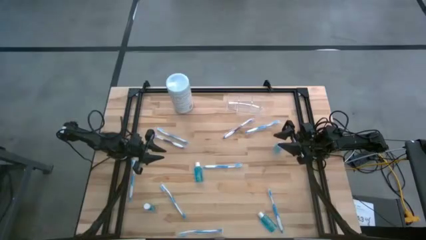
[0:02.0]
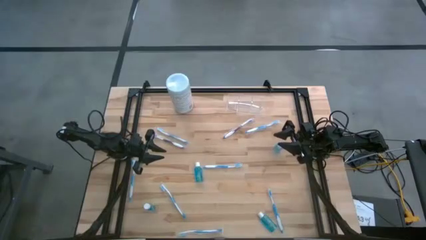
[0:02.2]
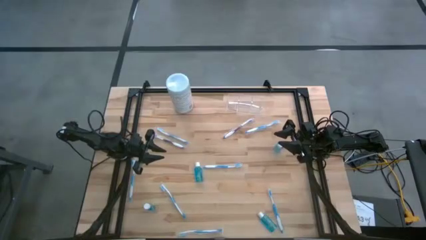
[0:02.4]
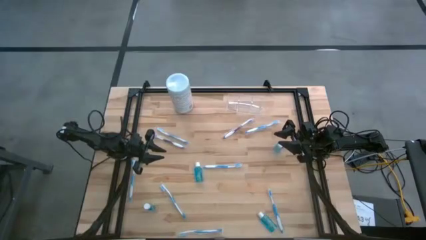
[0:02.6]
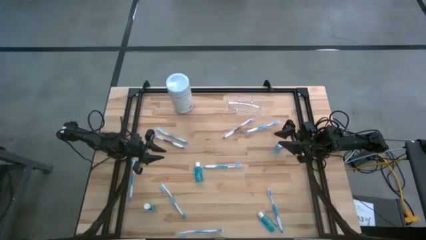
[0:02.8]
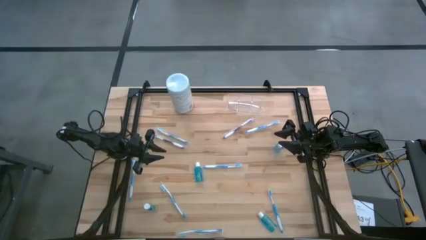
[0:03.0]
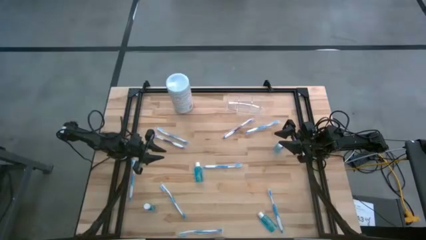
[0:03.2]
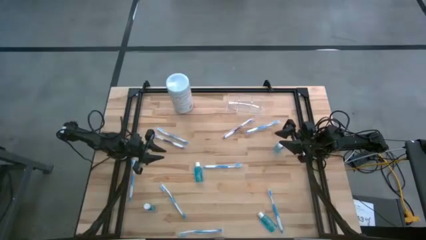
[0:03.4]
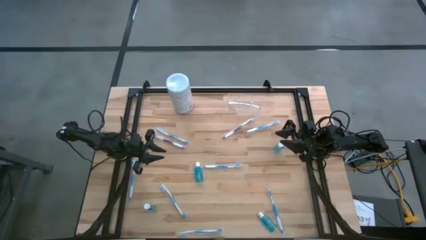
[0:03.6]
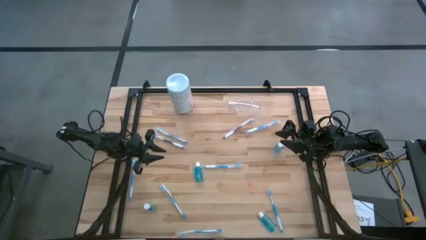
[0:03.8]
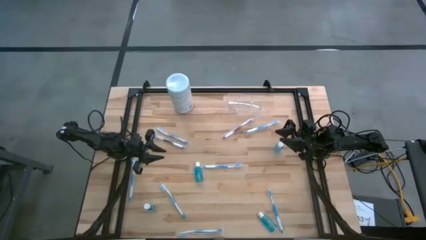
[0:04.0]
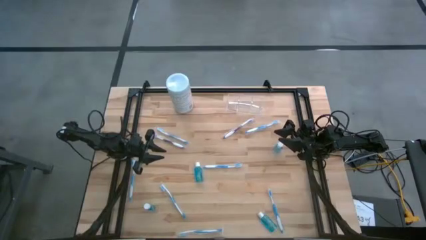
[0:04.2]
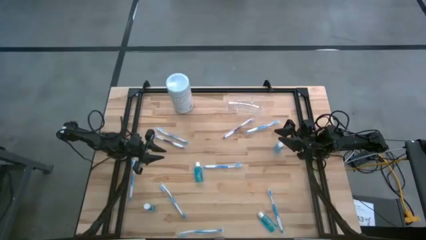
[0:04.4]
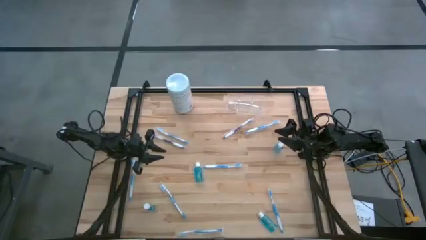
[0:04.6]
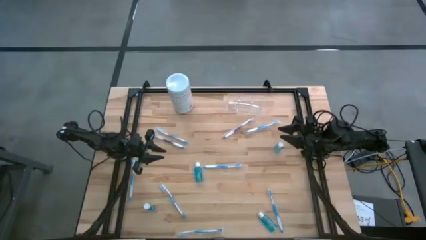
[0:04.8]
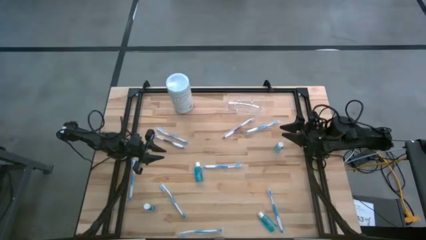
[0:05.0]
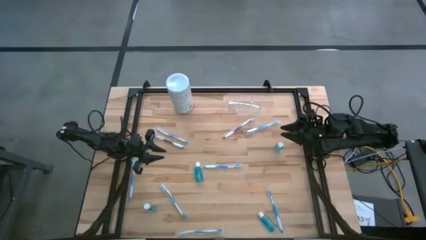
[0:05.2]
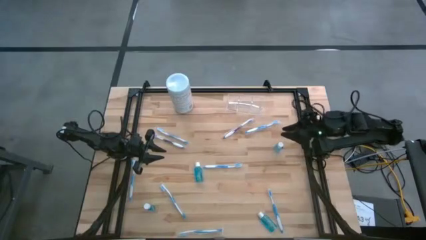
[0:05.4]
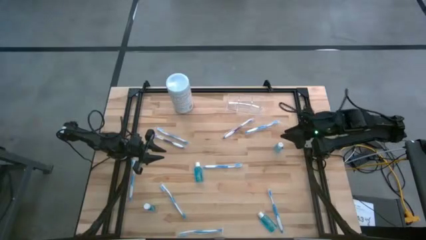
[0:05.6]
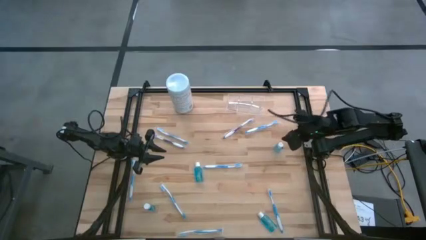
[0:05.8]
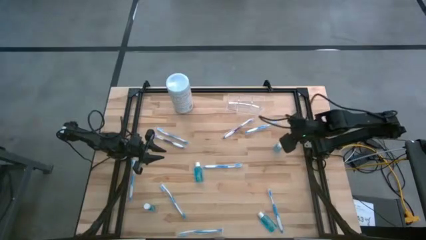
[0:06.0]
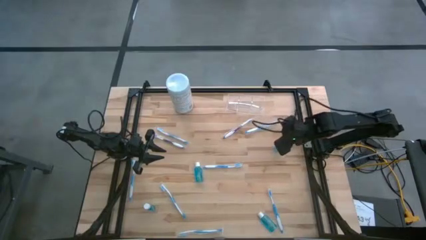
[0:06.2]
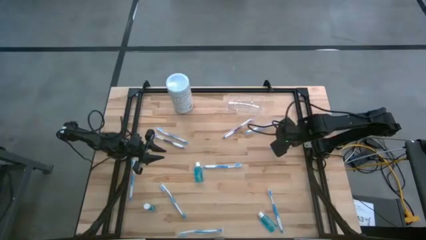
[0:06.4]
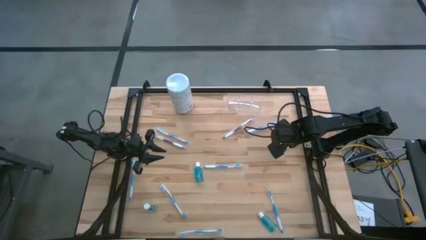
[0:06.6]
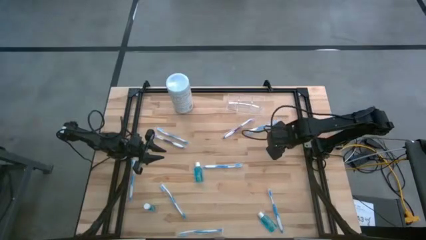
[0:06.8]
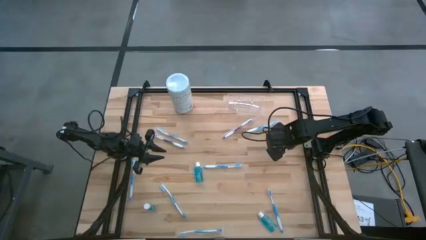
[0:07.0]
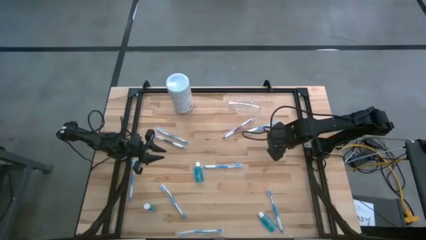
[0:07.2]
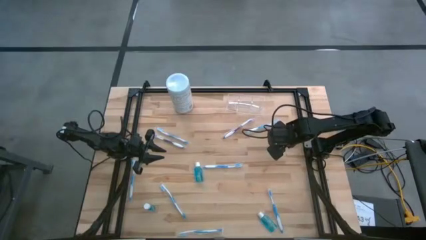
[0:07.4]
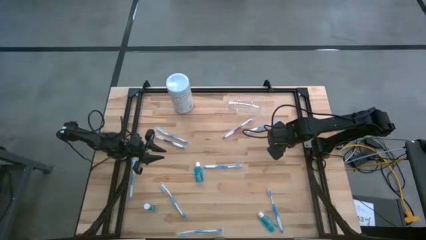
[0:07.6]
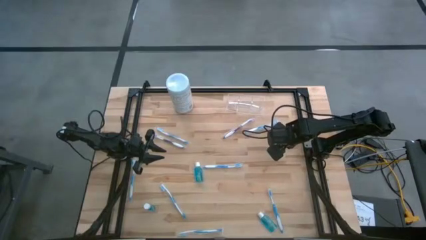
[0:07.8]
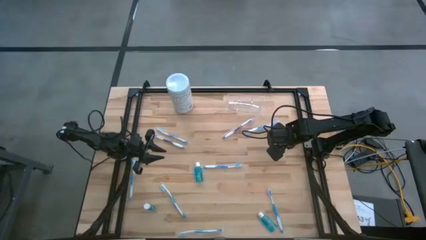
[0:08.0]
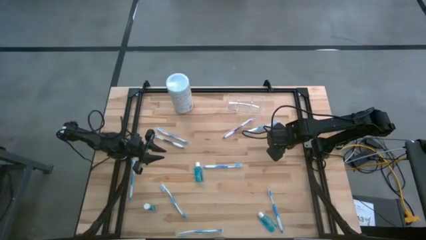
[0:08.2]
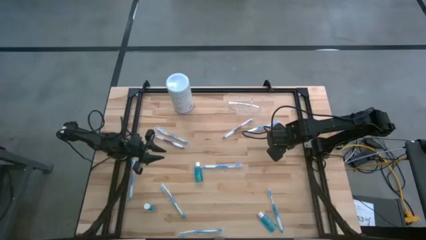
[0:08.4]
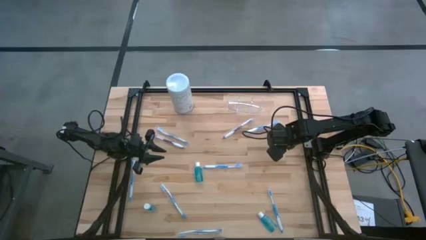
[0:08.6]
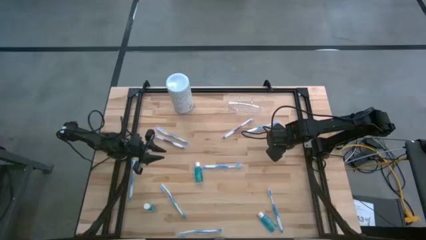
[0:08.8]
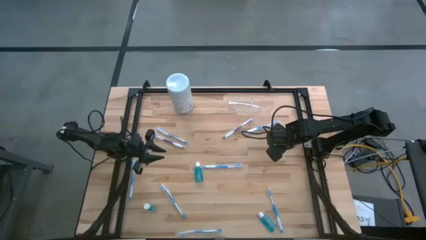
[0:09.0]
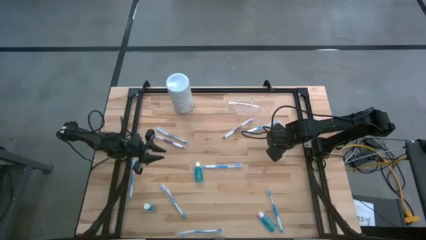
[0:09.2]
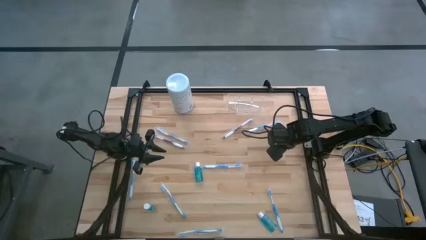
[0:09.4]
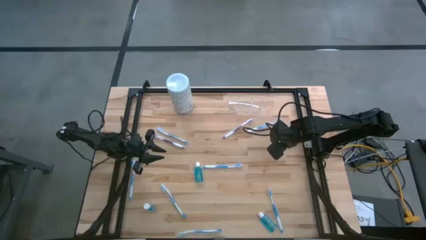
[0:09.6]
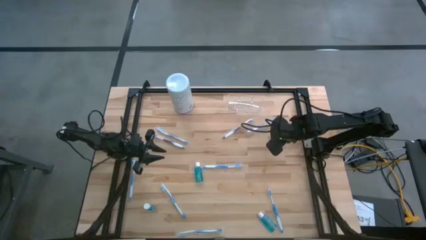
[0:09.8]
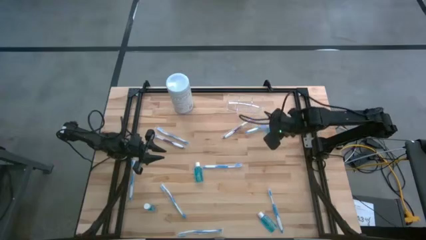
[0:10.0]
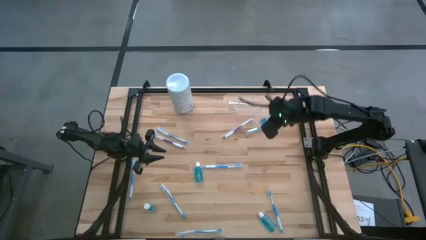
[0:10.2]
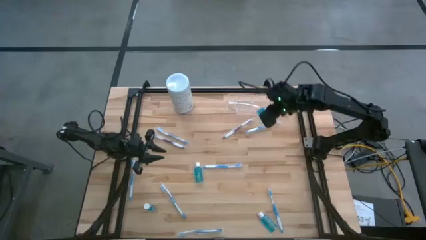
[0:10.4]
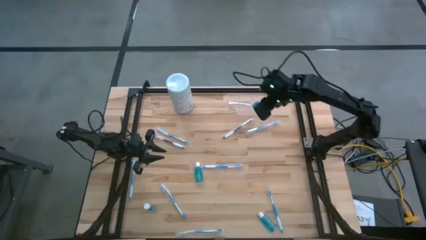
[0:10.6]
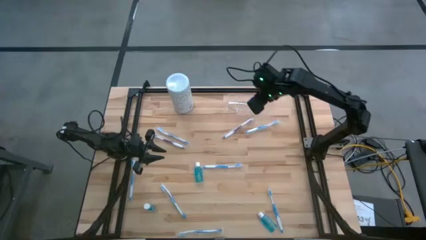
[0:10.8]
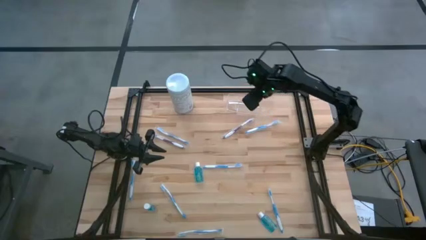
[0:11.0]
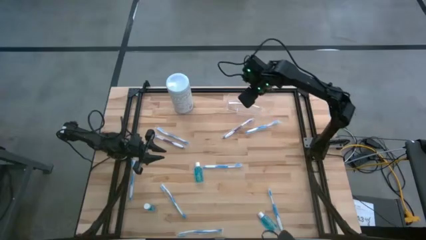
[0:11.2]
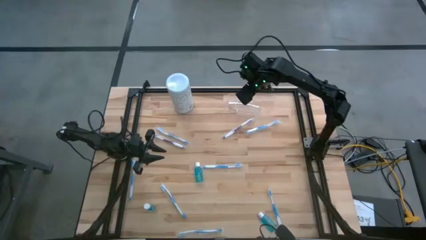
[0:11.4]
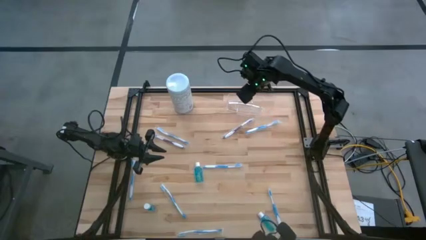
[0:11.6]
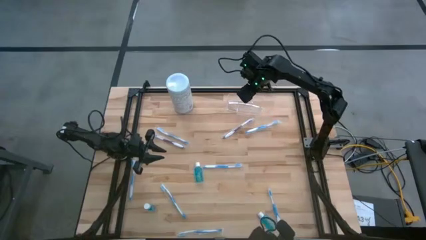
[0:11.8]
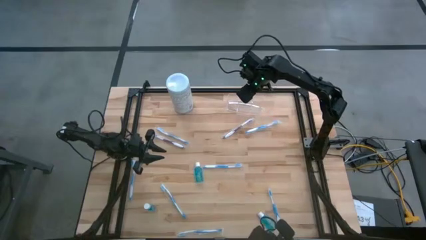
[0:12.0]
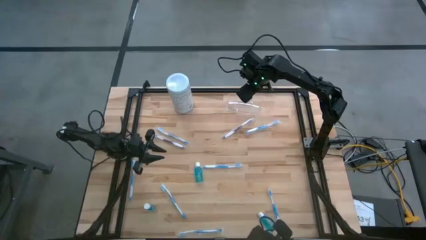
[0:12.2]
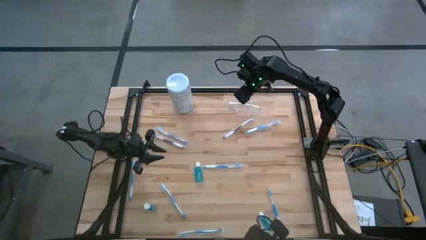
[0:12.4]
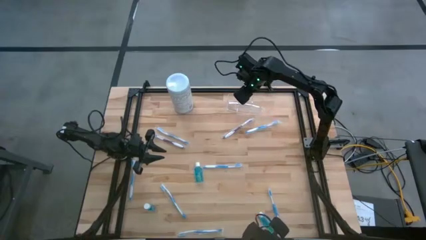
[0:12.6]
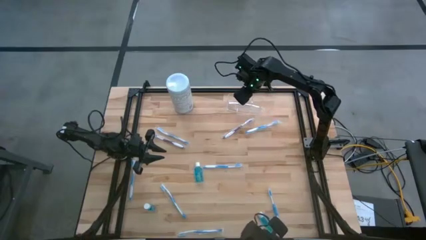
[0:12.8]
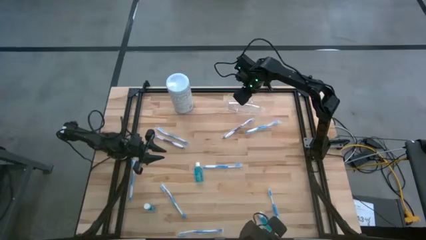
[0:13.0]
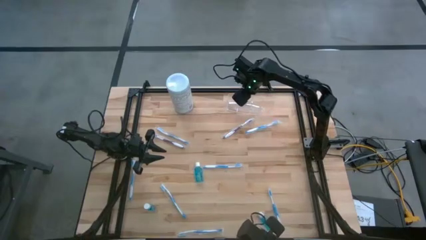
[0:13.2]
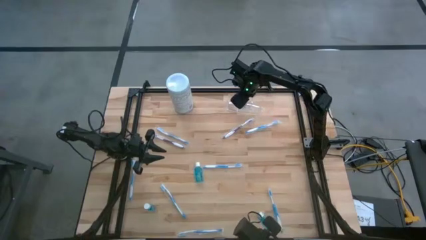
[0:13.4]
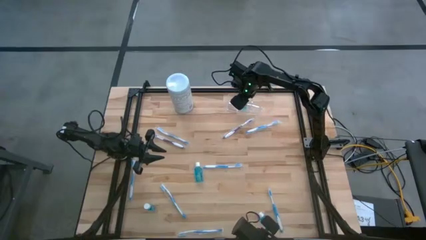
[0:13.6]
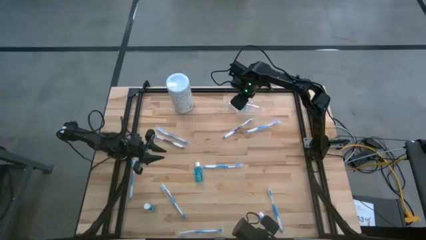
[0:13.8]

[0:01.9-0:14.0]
Task: Pick & Place toothbrushing station
Put the blue mouthwash into the middle of the transparent organizer

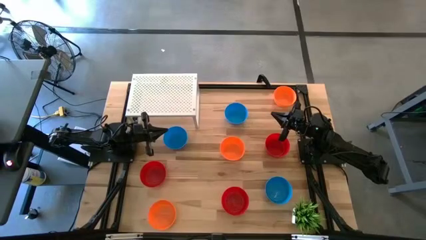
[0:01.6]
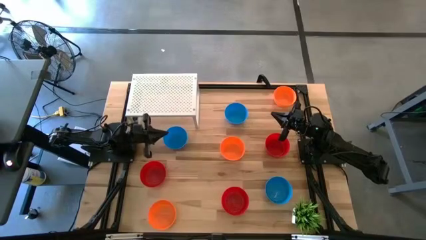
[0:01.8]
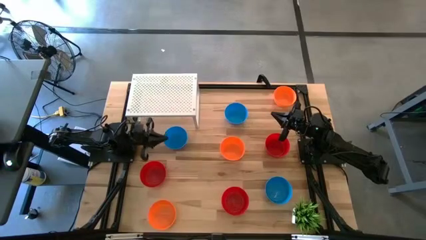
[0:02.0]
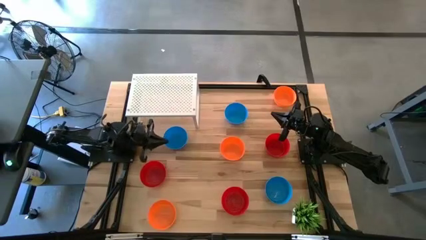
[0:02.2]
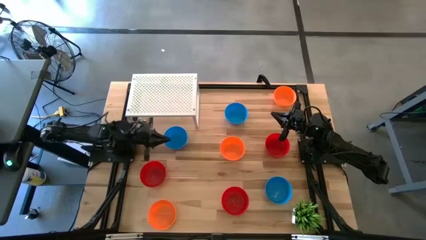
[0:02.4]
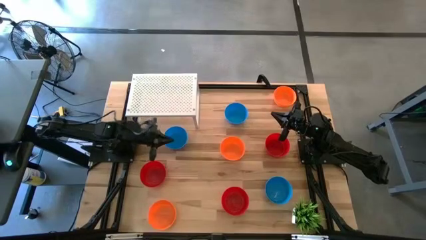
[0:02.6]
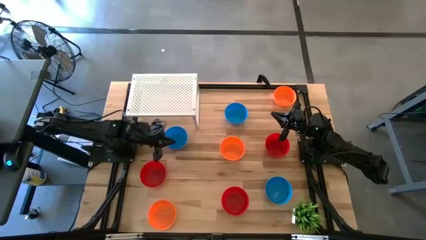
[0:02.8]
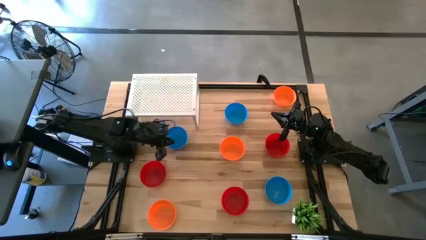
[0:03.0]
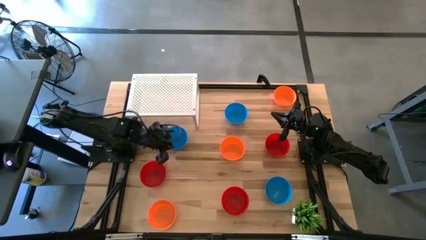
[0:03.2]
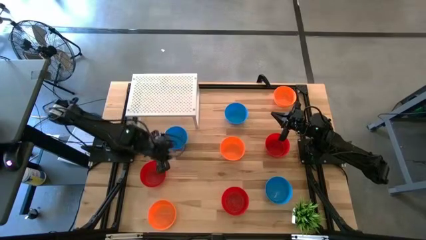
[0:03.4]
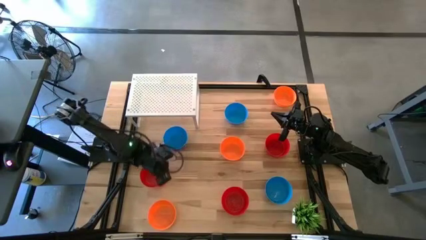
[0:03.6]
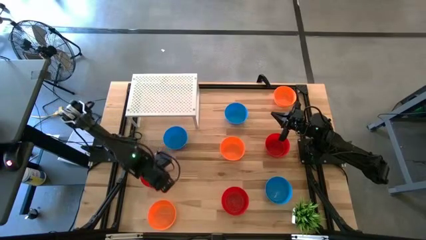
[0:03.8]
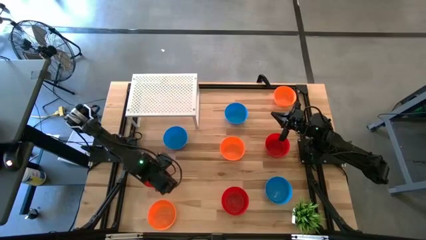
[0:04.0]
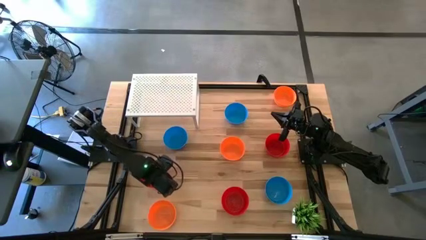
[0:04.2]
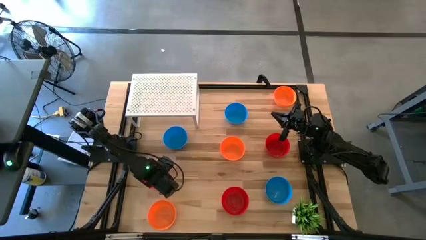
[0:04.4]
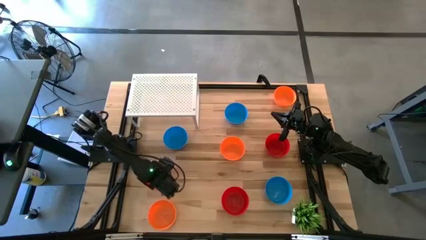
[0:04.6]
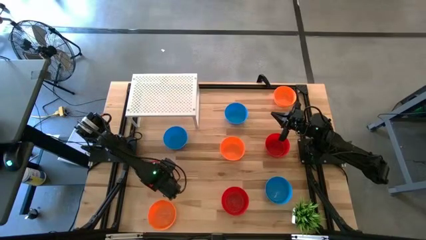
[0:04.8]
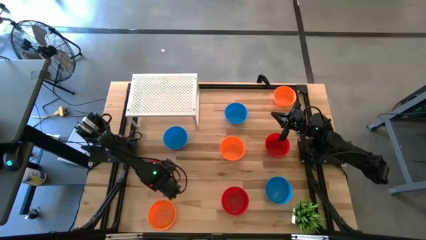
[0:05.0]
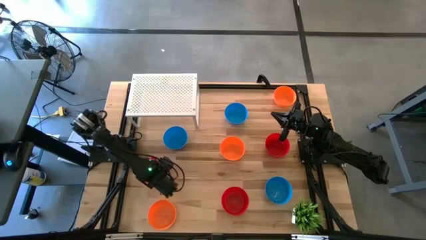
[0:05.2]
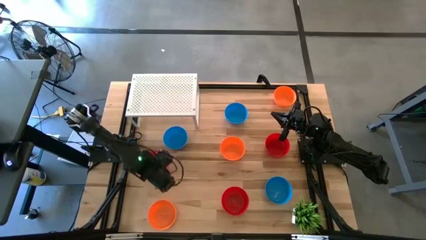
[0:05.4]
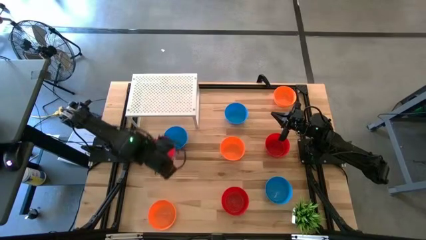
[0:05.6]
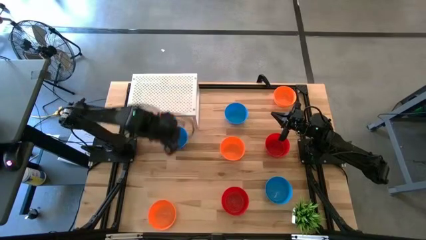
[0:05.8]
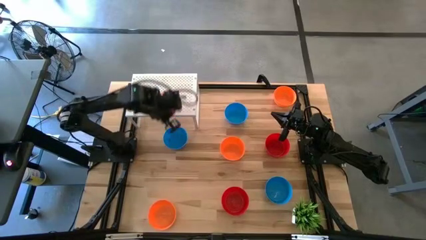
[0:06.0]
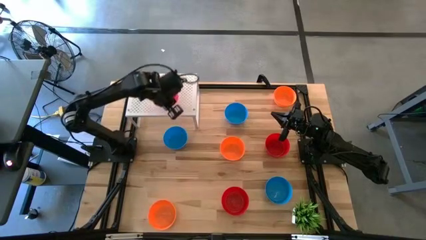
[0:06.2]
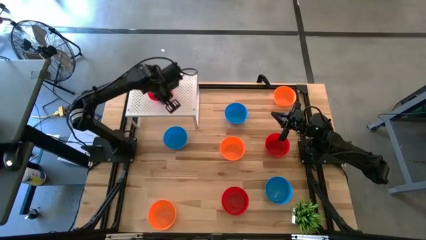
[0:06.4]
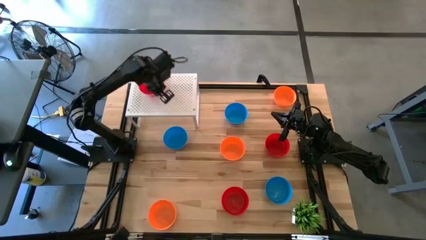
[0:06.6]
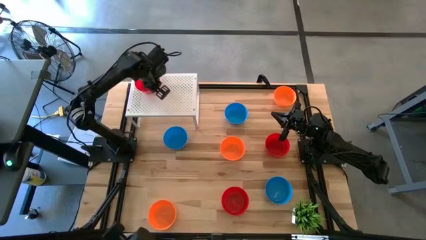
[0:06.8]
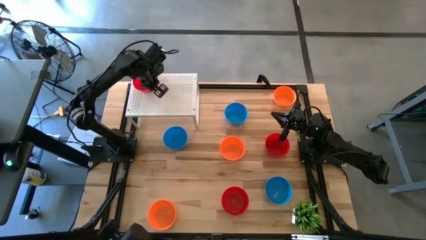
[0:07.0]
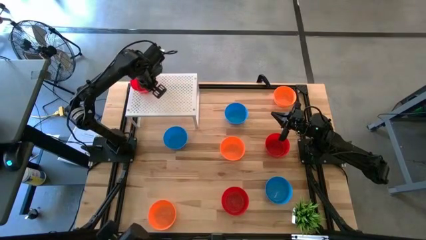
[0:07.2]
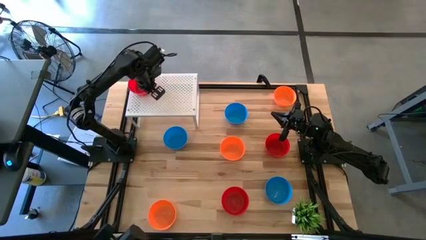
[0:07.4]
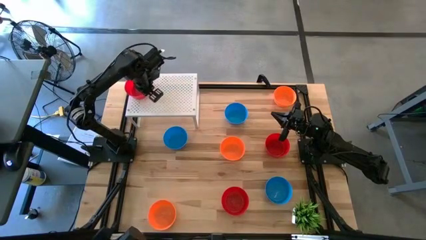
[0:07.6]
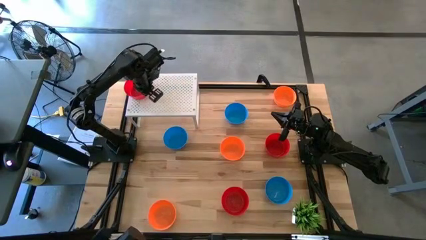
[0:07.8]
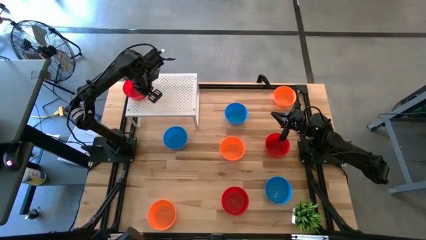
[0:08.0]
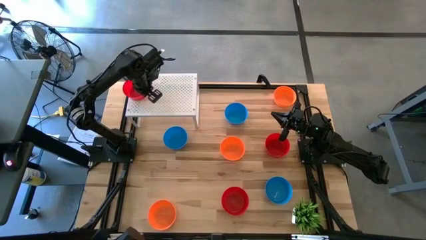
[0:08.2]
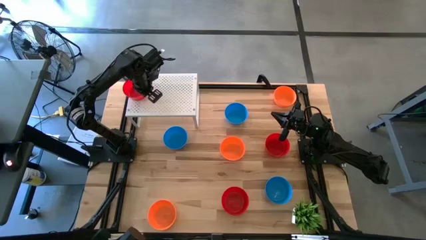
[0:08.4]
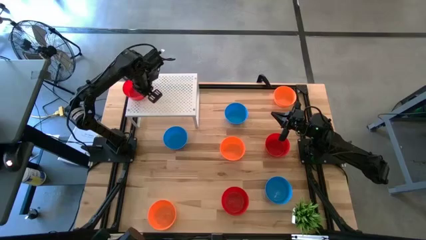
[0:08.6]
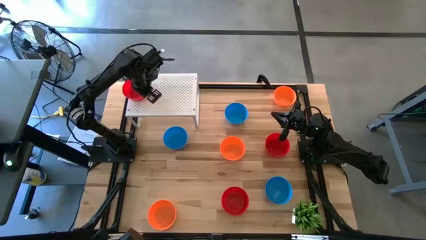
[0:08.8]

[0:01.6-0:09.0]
Task: Pick & Place Mini bowls
Put the left red bowl on the shelf
